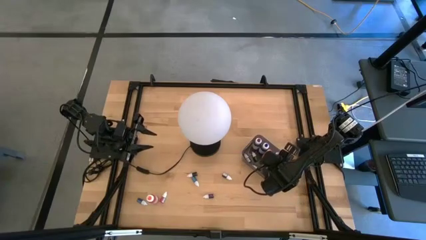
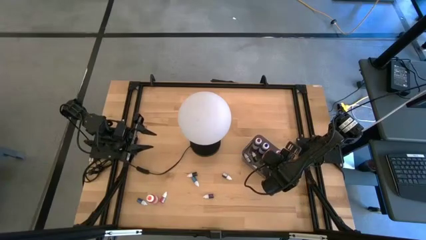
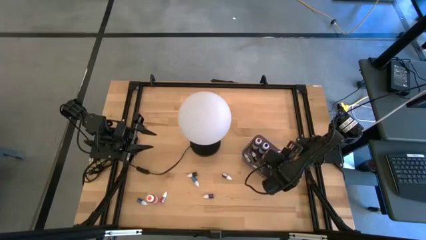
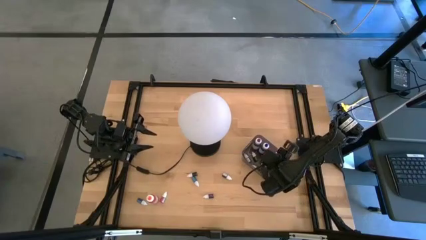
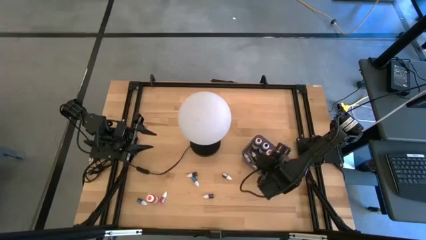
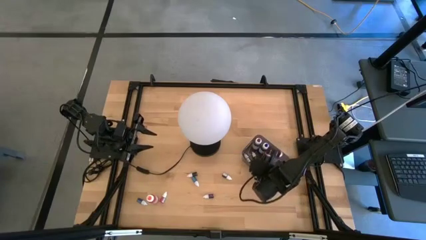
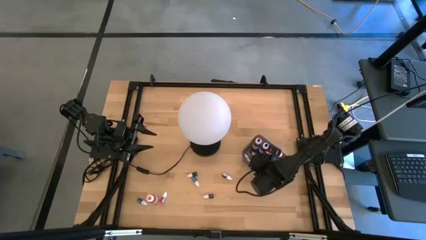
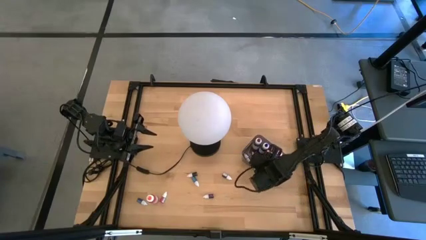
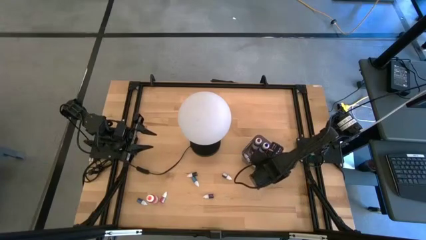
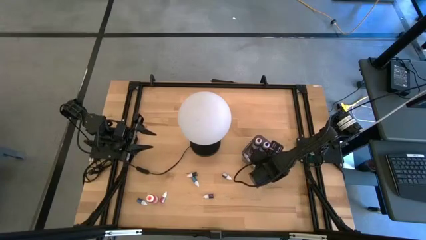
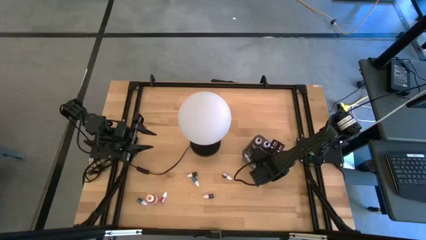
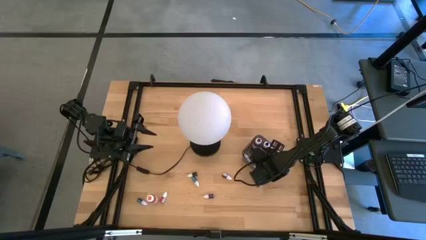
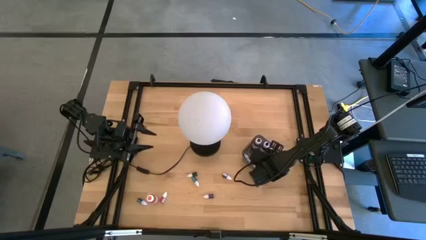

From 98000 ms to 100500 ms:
Task: Pick & Place food coloring
Adjust the large orange food coloring bottle in the black container

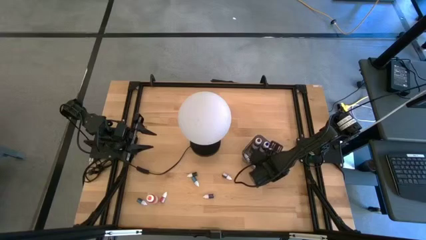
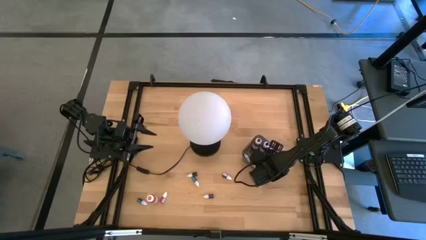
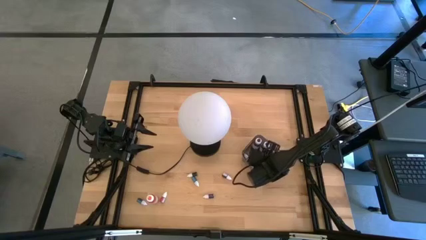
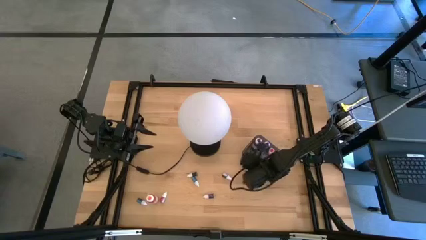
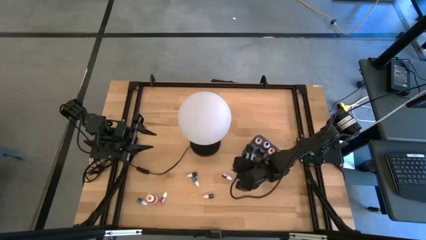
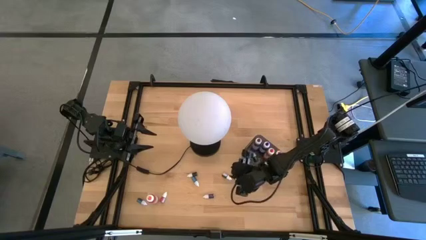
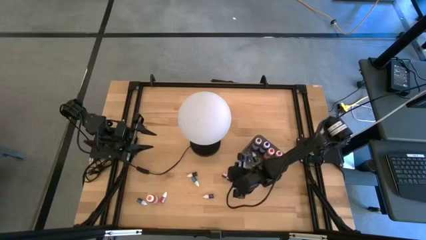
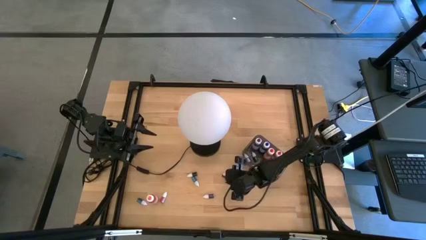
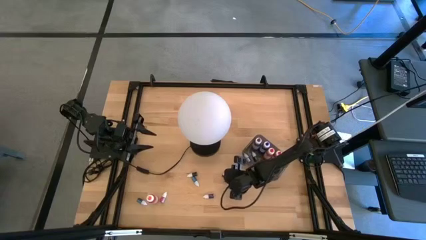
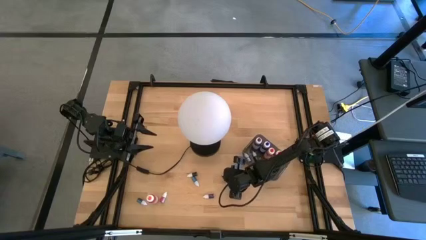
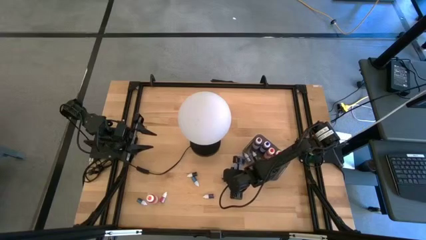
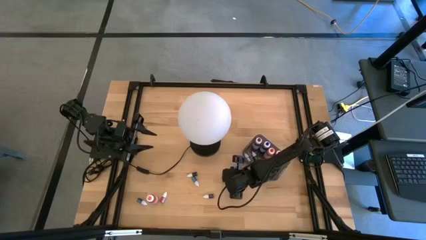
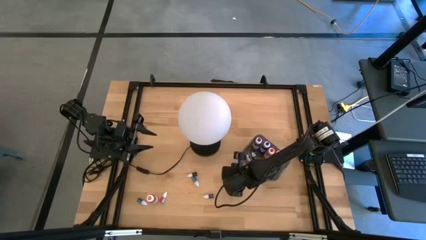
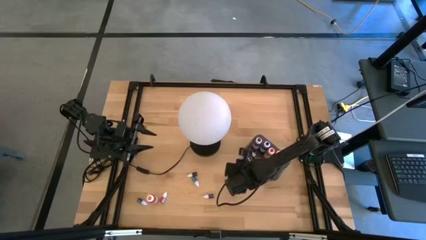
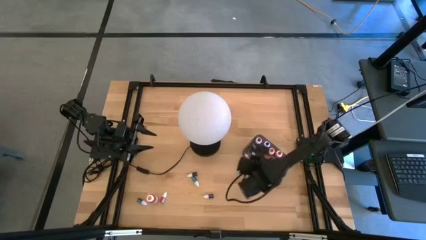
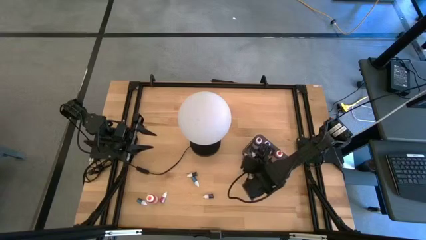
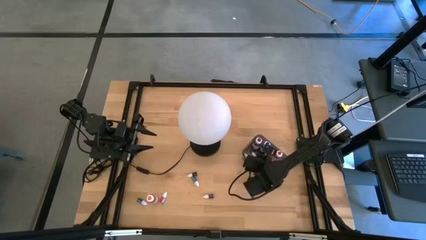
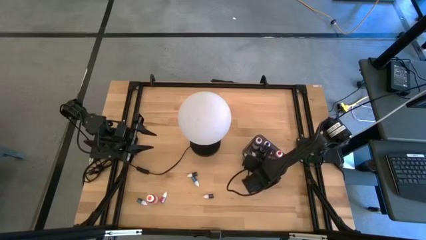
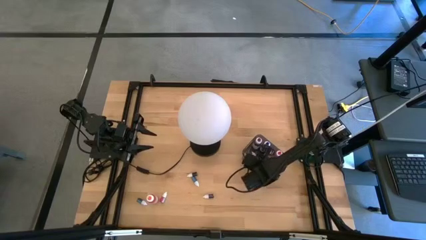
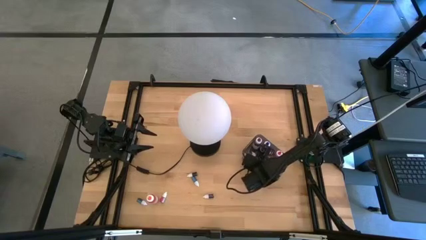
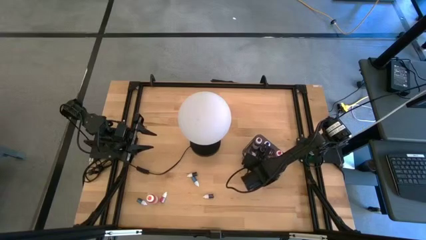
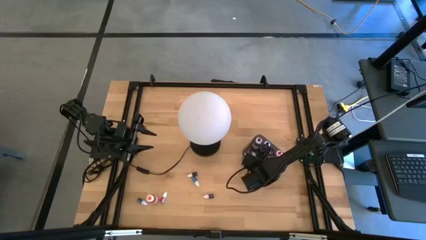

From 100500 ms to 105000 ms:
Put the small black food coloring bottle into the black container

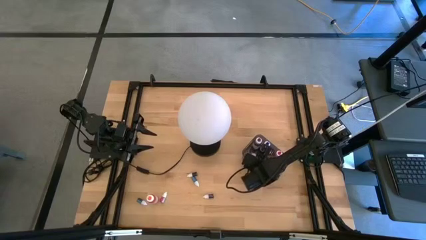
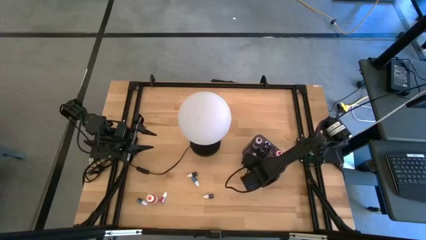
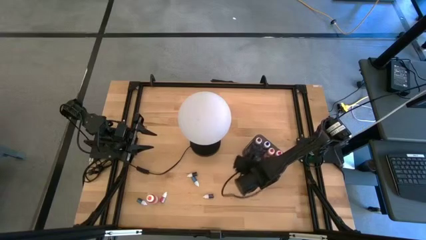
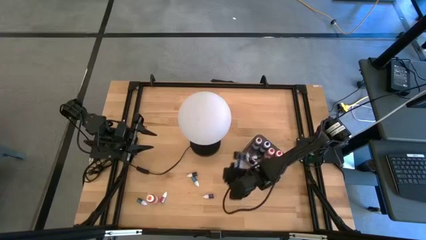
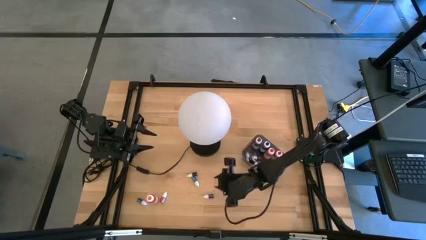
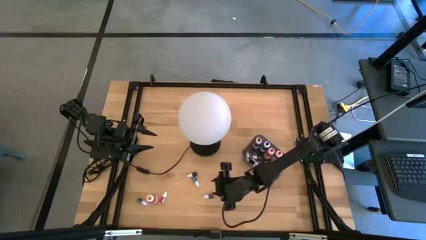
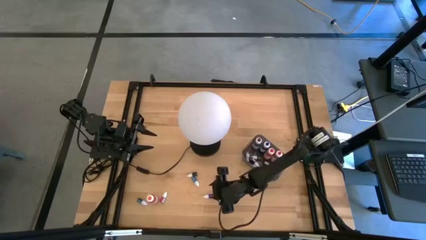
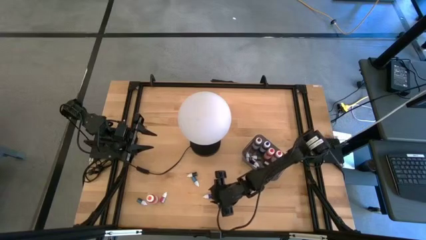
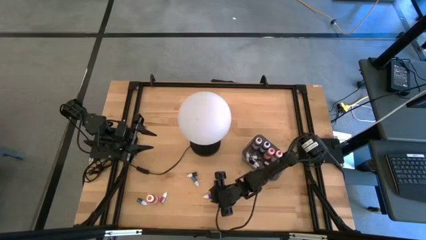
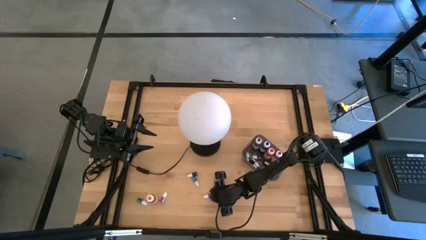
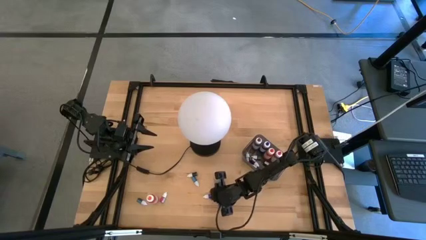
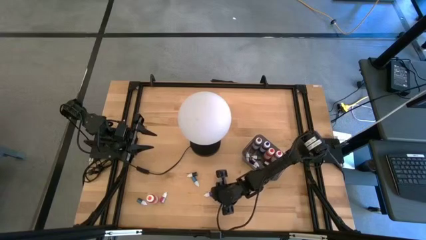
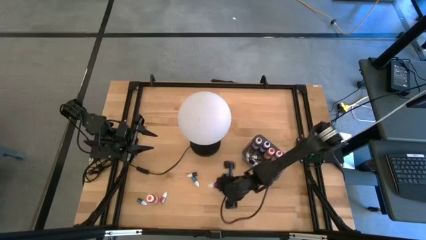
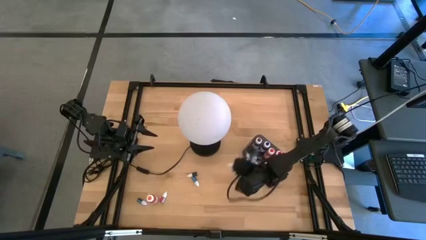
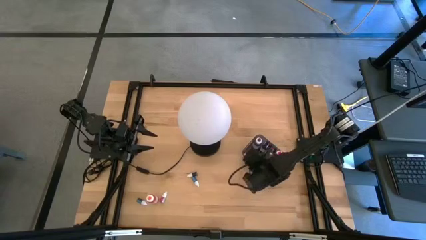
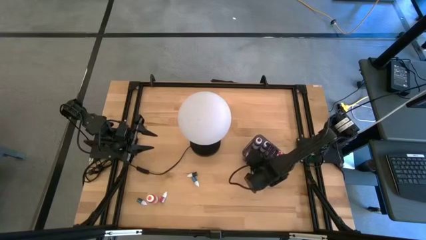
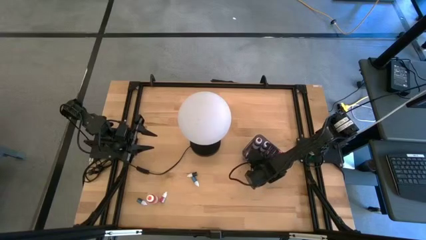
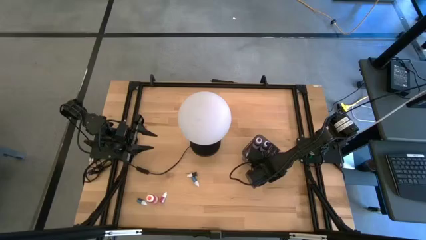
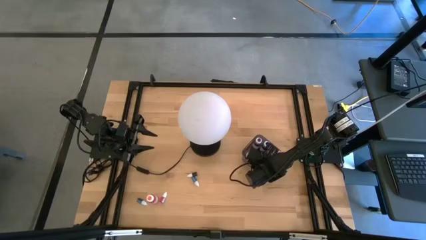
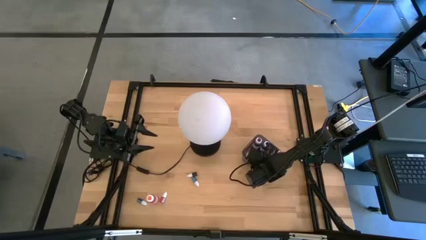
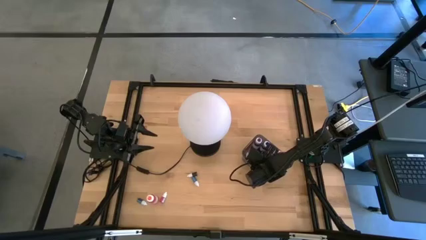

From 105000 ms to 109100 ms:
Put the small purple food coloring bottle into the black container

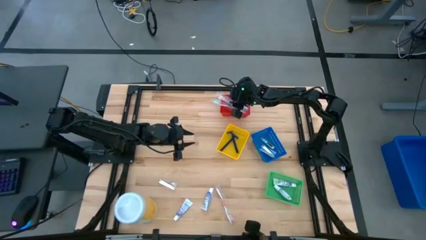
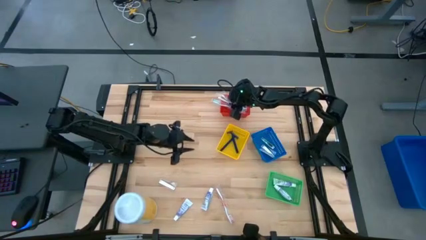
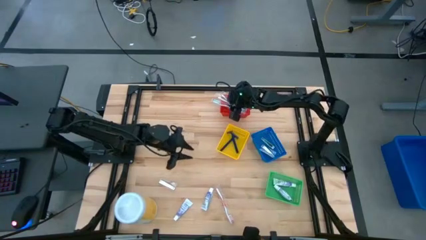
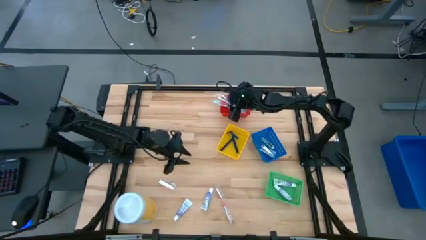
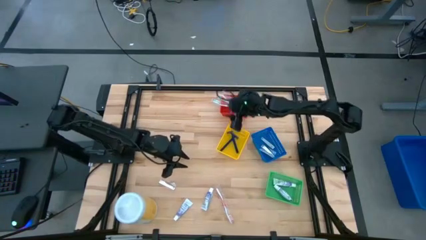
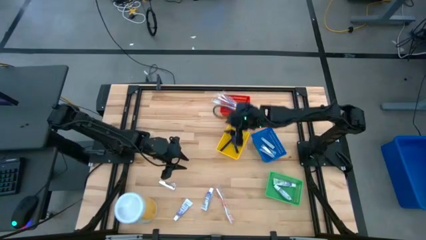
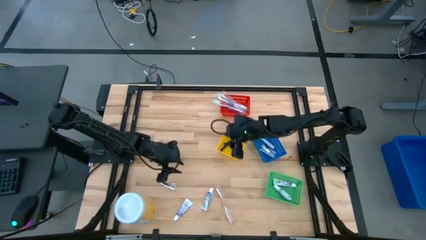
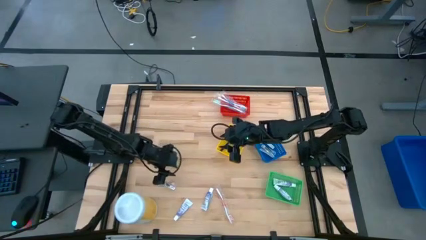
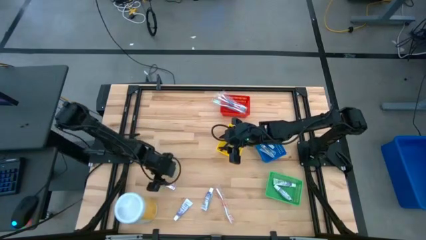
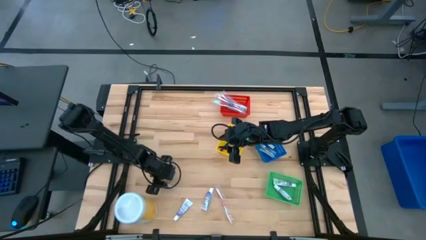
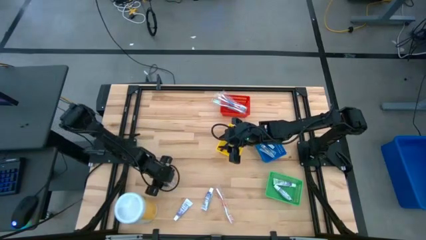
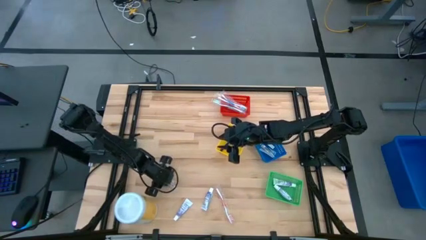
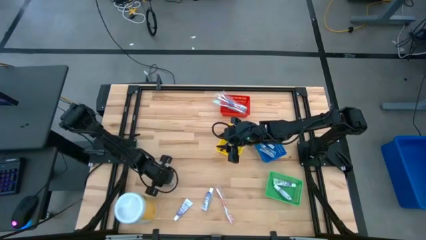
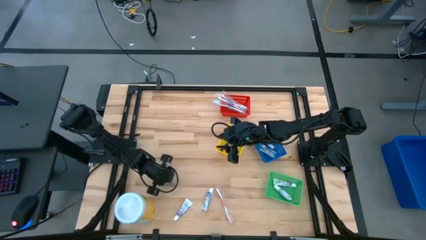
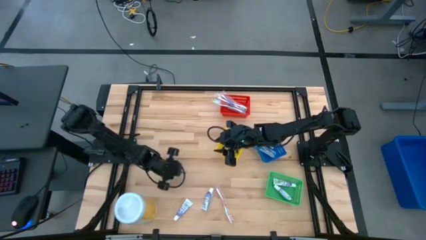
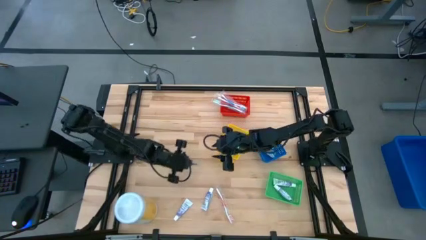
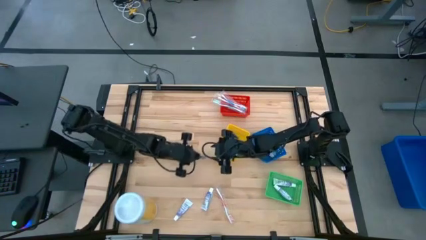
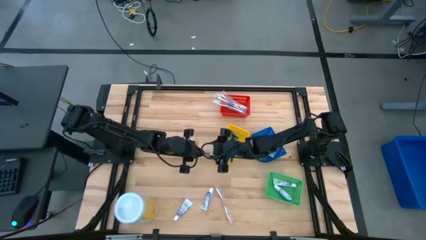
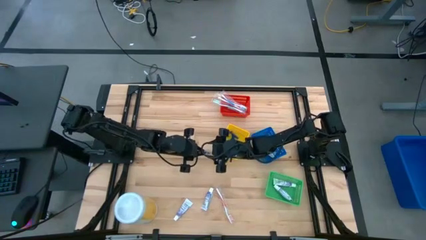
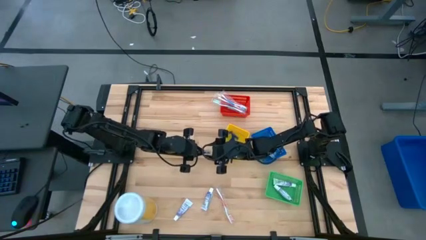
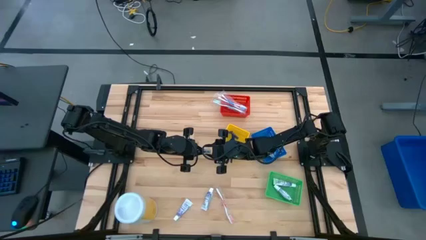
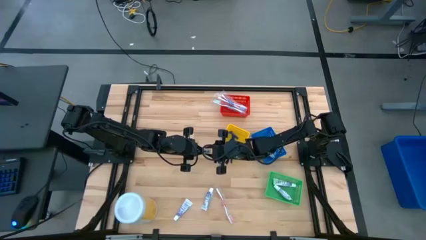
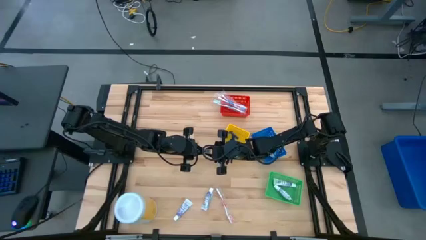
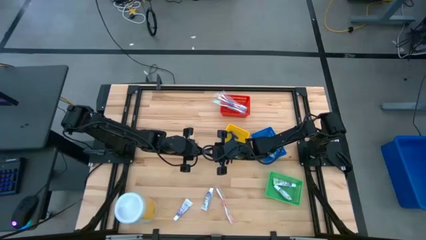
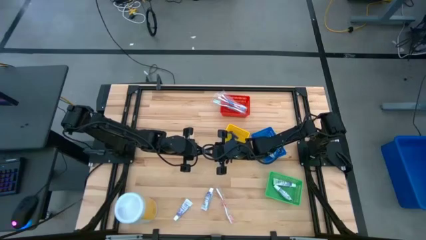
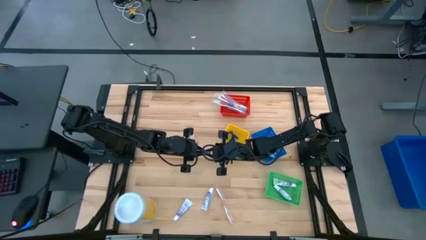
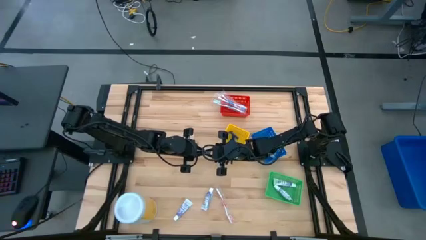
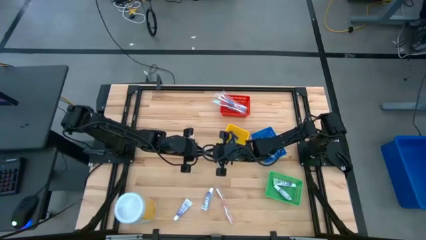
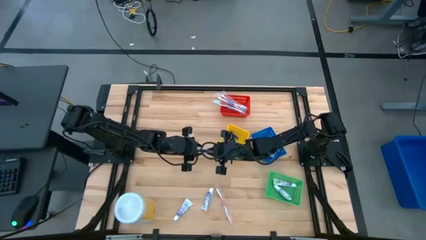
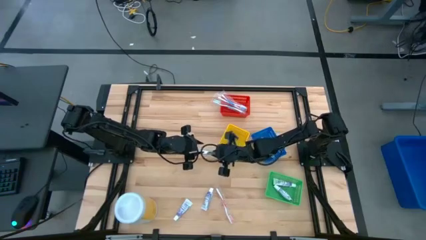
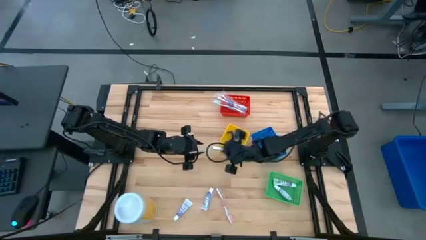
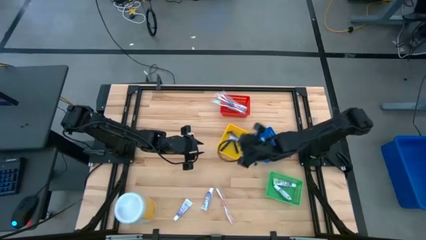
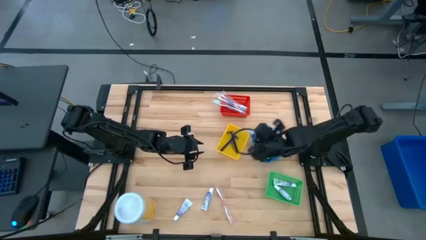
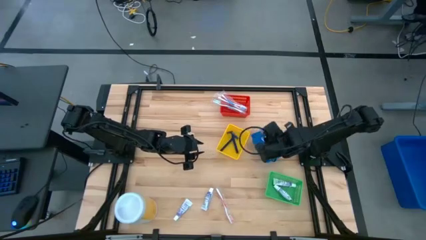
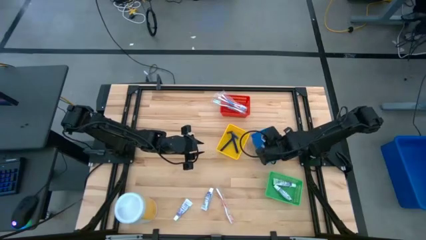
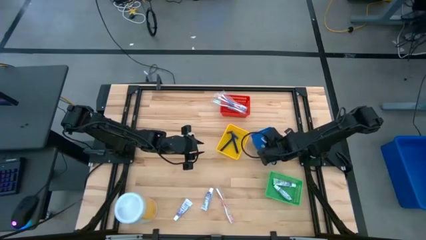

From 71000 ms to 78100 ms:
Task: Pick & Place Travel size toiletries
Put the nail cutter into the blue bin
